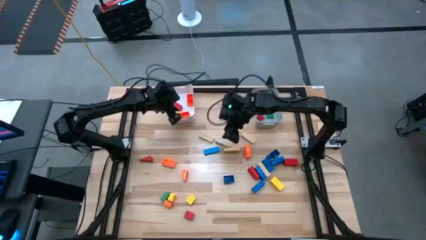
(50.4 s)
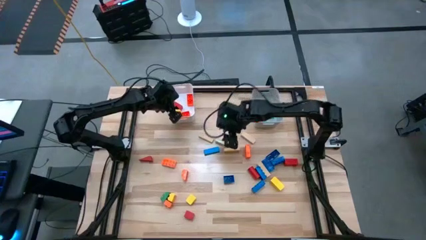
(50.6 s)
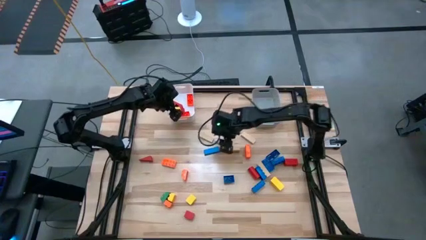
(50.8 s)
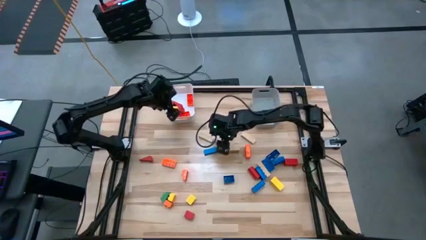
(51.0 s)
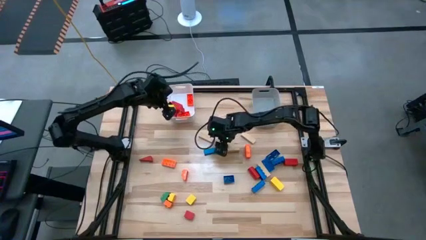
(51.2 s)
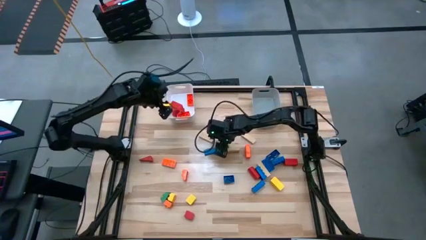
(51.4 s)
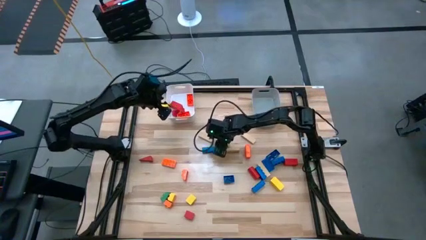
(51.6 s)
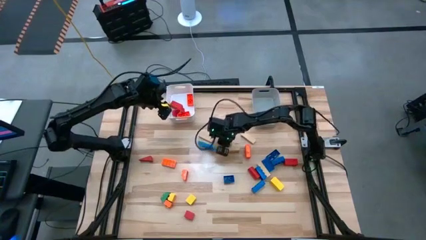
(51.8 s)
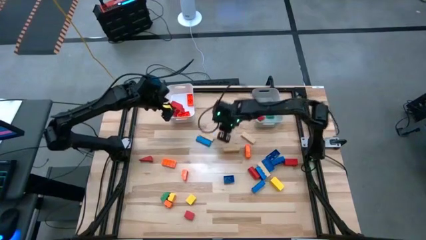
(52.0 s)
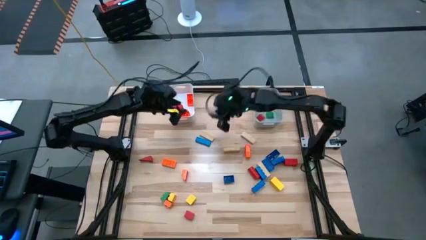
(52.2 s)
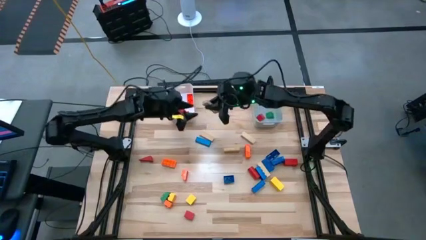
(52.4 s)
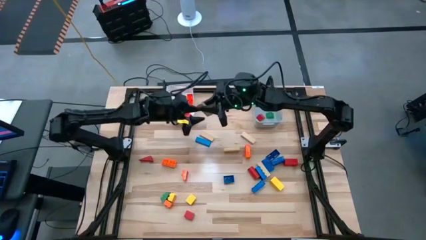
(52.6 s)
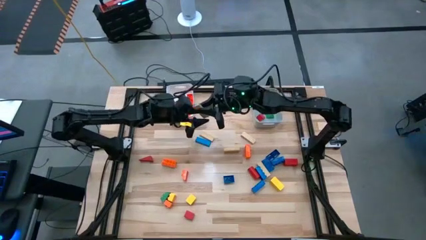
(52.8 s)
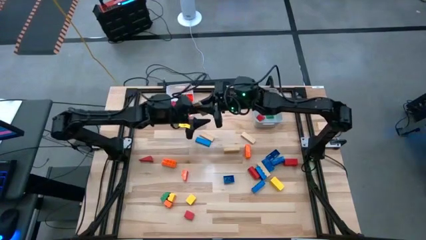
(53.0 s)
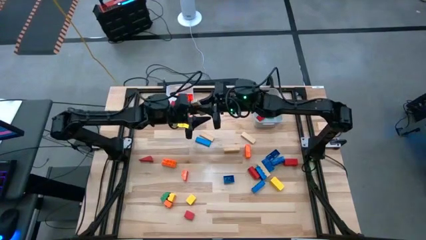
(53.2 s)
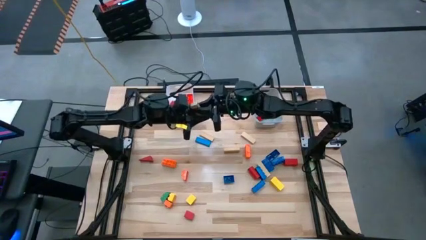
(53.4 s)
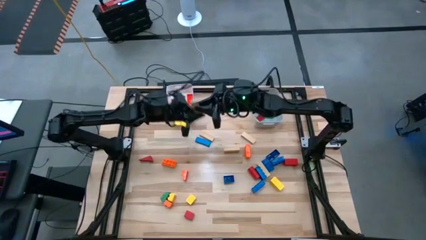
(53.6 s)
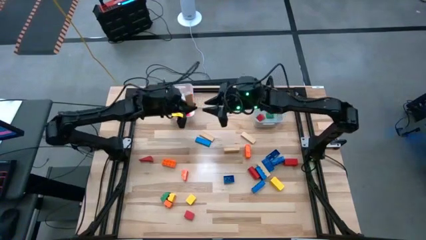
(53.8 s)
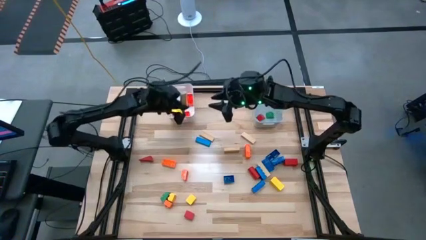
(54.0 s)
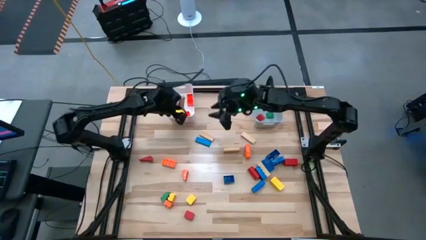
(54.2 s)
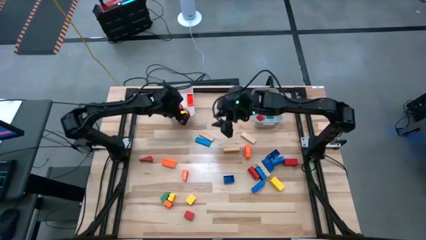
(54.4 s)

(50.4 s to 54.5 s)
Task: Sort blocks by size
Put the light brown rectangle wooden block into the white bin

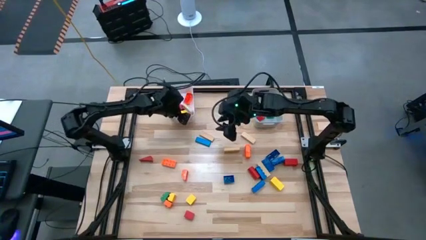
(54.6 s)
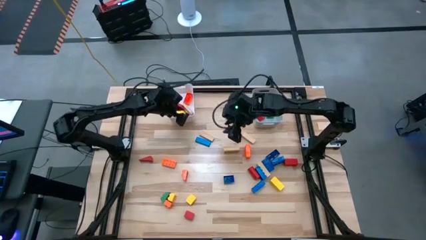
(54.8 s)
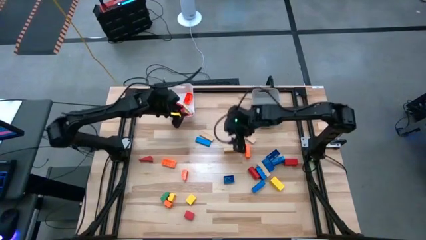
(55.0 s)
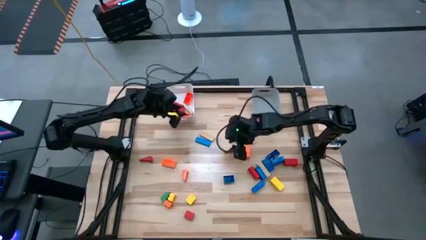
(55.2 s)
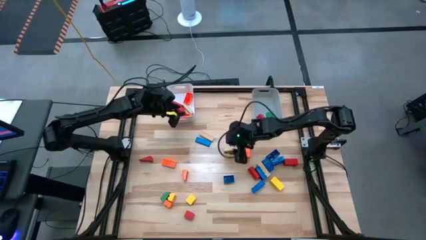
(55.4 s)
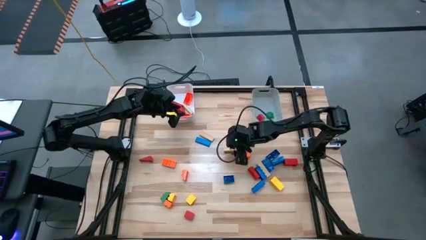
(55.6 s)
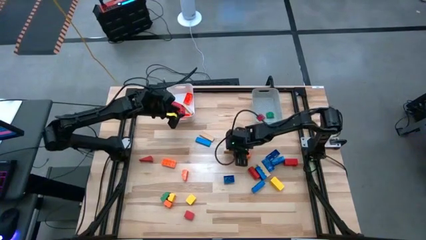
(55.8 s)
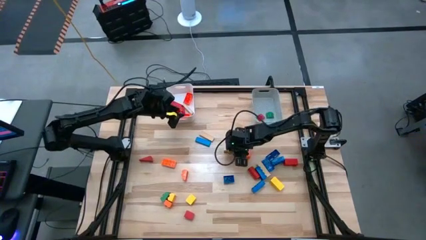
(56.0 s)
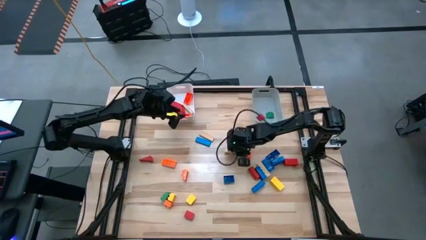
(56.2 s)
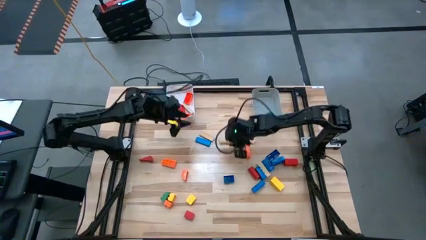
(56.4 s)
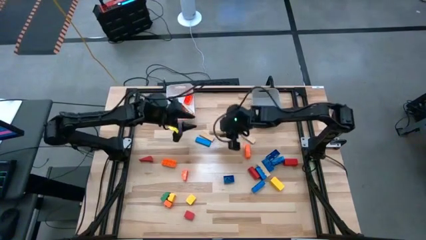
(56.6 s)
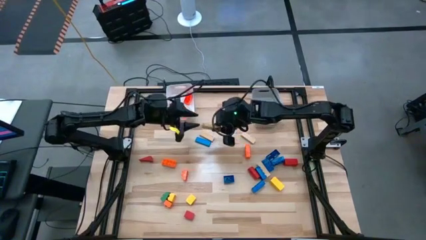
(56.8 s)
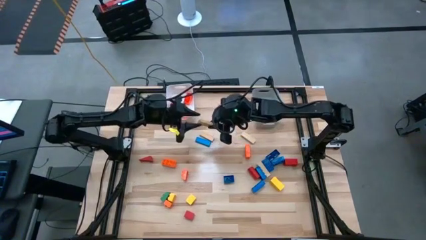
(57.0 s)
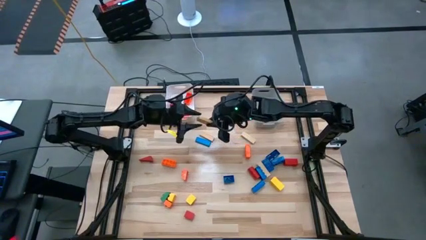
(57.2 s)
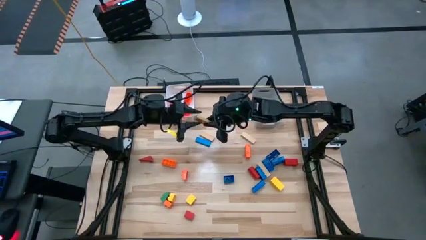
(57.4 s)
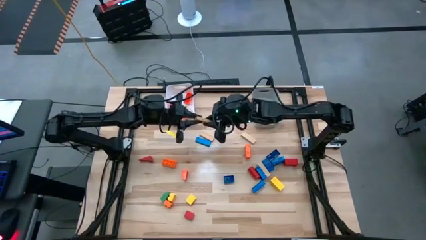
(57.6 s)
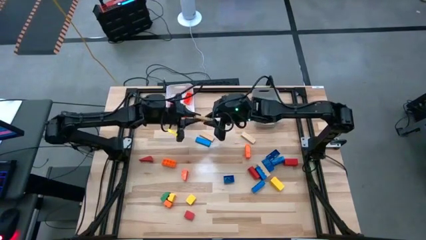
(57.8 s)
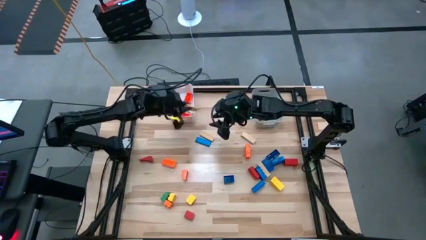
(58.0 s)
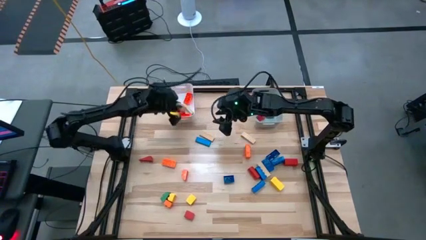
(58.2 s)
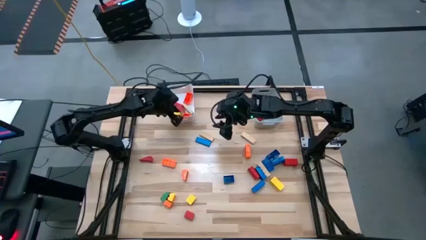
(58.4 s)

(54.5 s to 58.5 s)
Put the light brown rectangle wooden block into the white bin

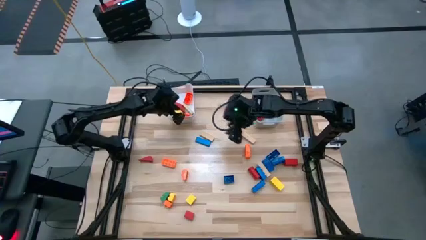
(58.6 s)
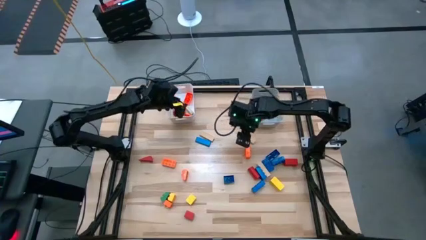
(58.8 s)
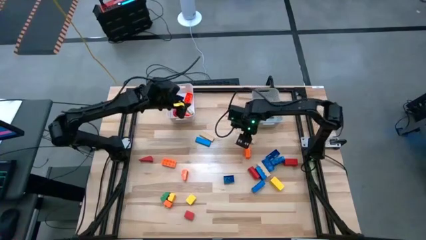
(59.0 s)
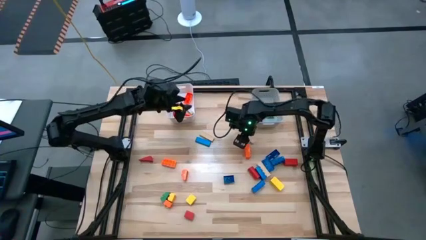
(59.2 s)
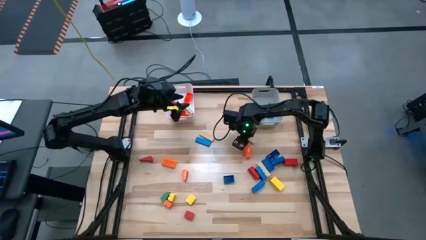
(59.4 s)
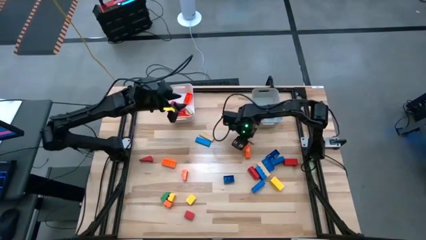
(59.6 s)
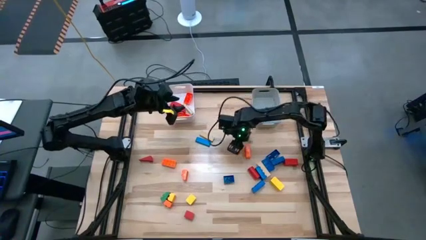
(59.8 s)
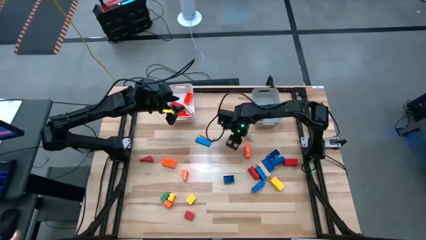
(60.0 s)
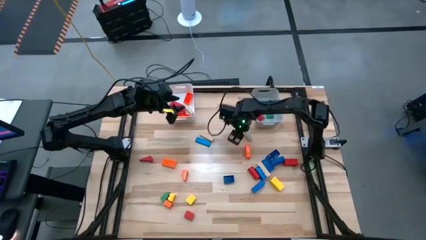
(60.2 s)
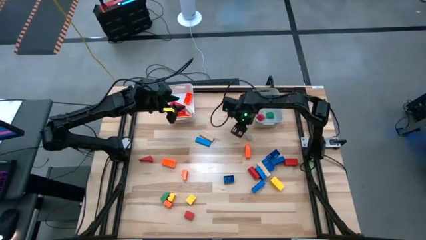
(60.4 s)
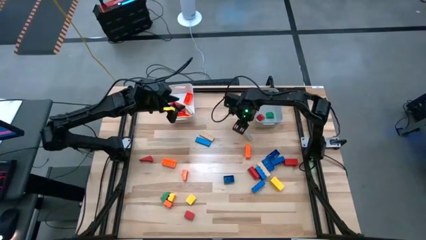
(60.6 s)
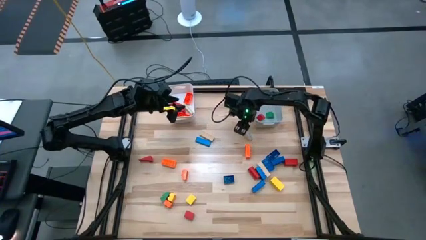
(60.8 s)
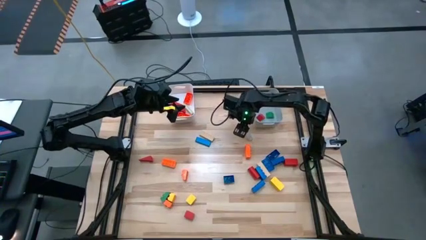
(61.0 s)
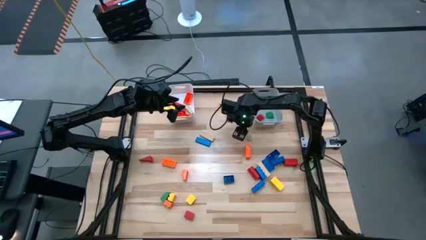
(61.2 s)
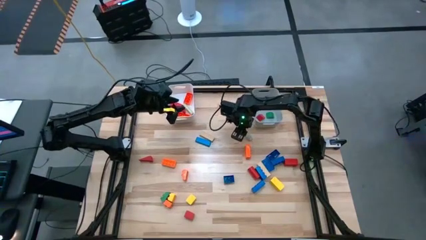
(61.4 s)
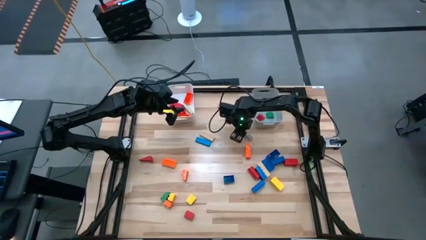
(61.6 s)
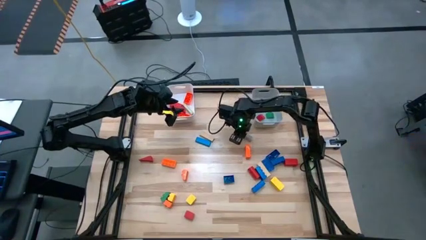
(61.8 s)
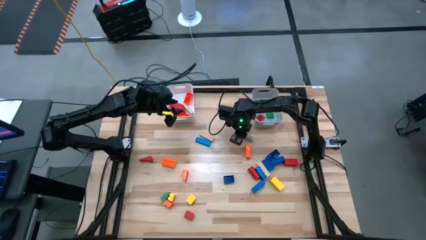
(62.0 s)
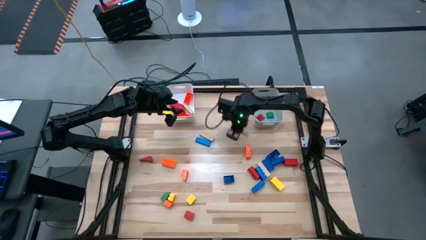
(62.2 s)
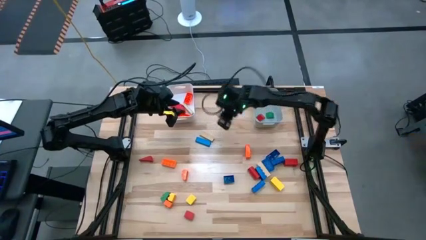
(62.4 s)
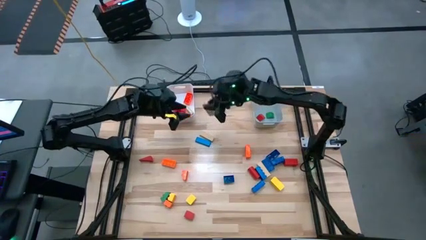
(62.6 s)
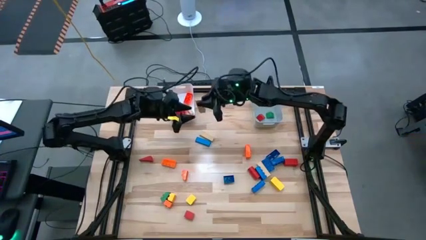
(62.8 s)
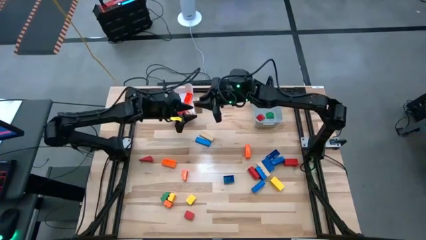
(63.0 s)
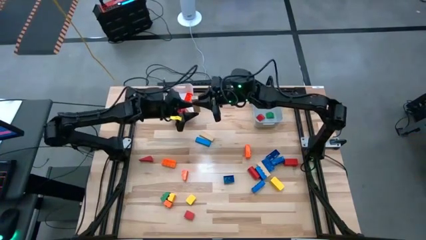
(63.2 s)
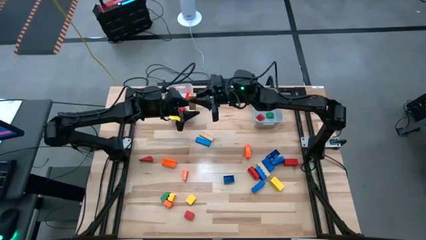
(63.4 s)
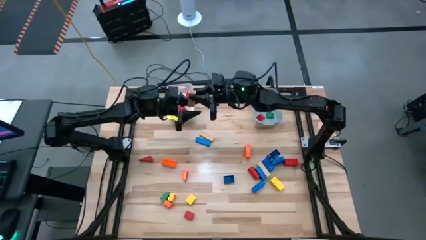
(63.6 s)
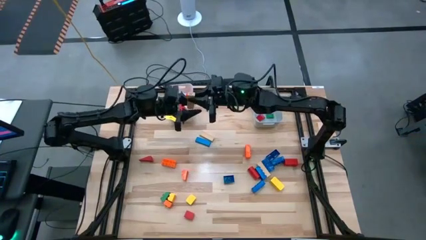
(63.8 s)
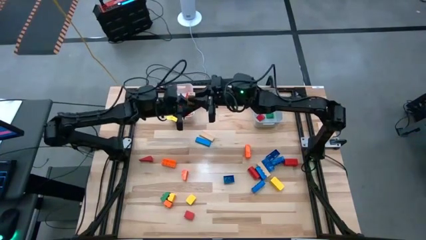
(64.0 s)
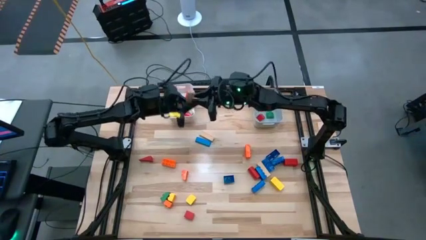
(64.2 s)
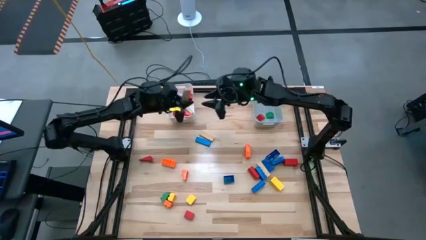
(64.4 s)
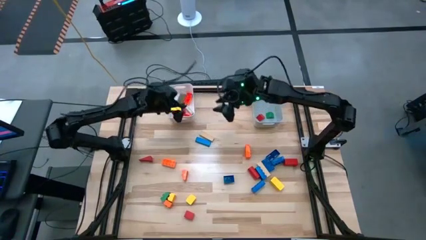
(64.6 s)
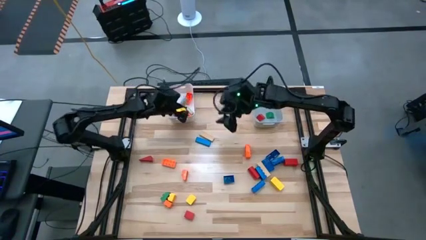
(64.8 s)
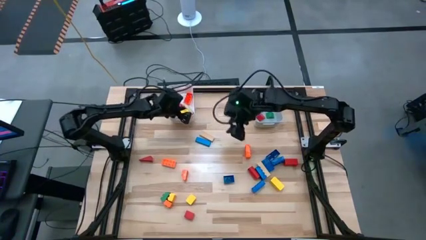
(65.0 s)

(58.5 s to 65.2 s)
Put the light brown rectangle wooden block into the white bin

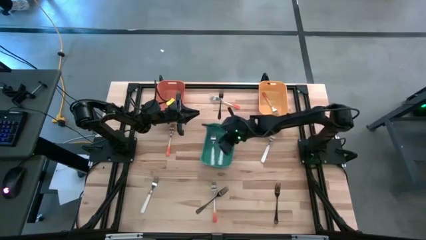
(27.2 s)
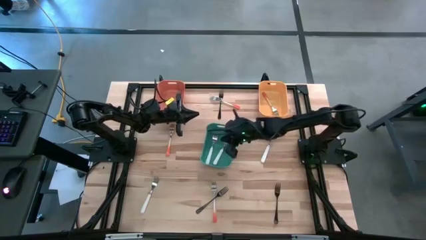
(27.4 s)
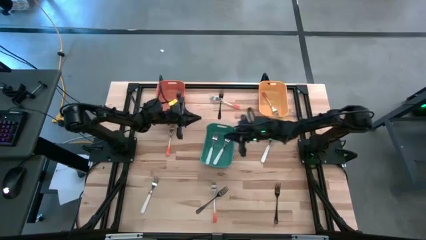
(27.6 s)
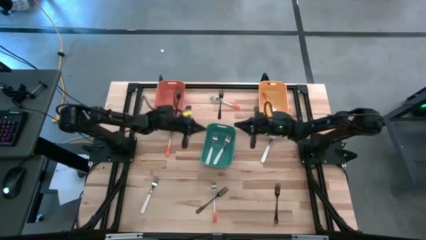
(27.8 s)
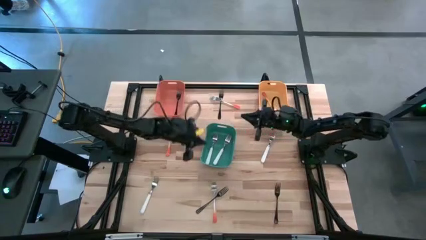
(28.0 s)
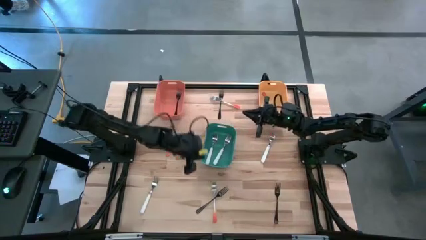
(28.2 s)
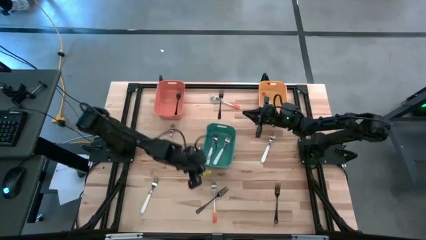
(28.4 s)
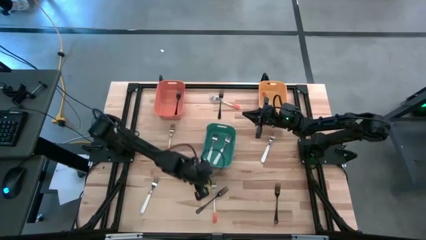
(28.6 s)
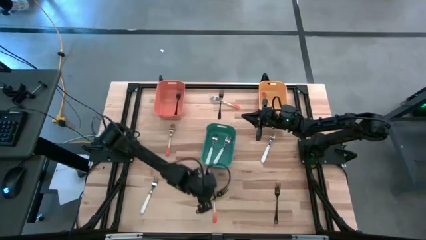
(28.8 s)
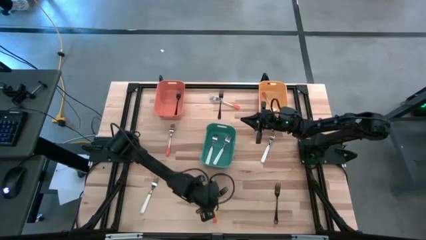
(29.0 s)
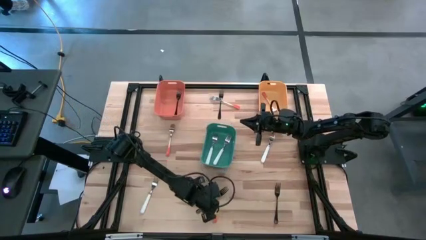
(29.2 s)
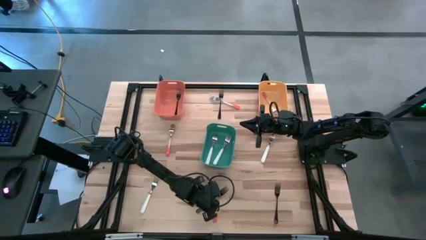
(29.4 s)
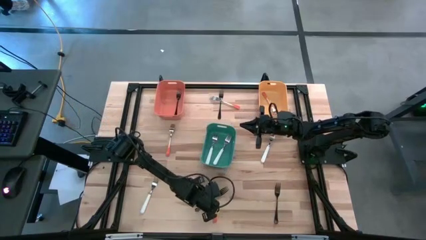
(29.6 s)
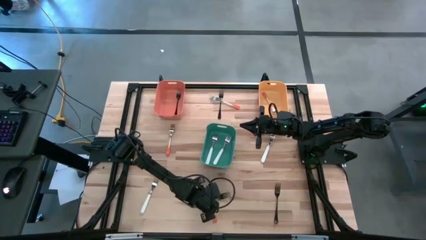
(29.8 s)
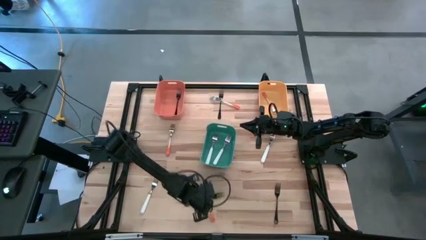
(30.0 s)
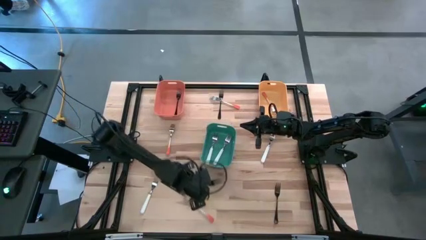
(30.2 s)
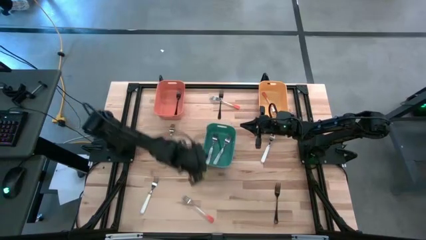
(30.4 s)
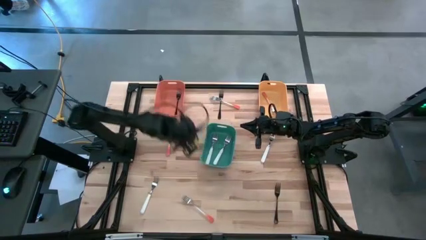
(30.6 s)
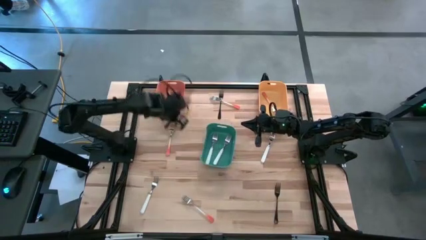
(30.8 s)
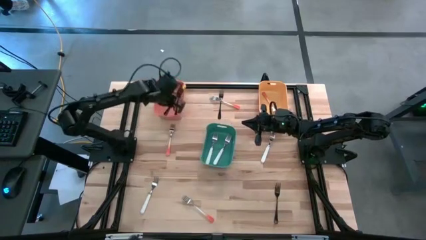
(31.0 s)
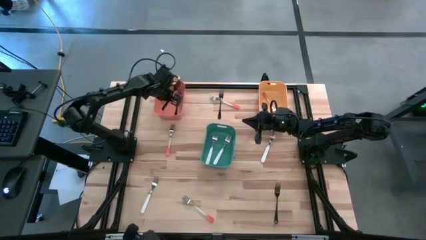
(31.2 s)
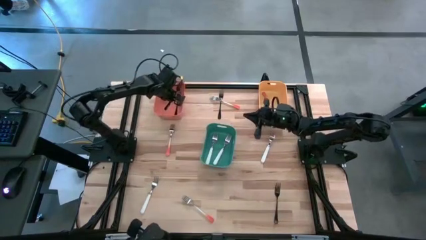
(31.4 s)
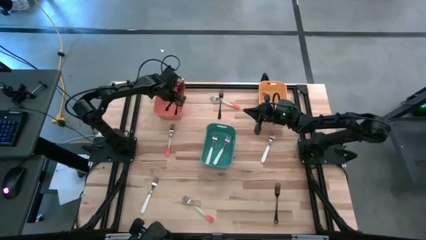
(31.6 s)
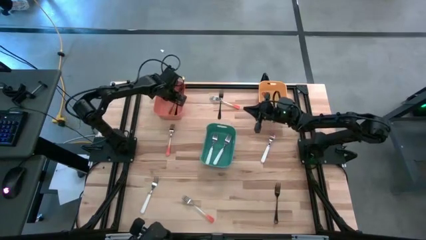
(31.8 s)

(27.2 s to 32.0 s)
Task: Sort silverware by color (type)
Put the bottom center black fork into the orange bin
